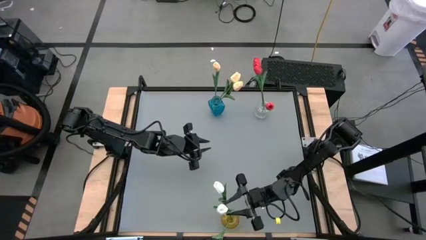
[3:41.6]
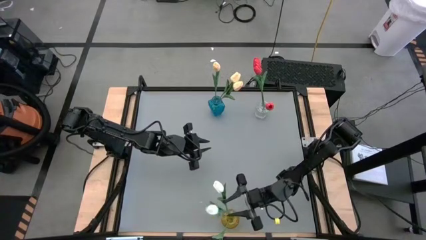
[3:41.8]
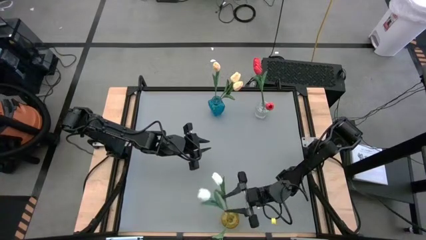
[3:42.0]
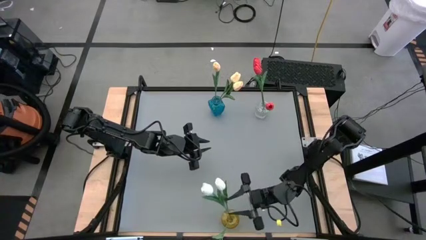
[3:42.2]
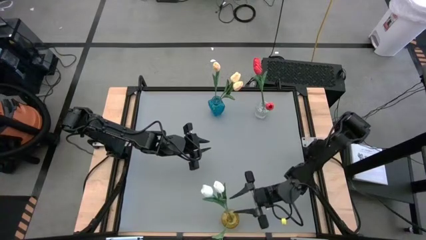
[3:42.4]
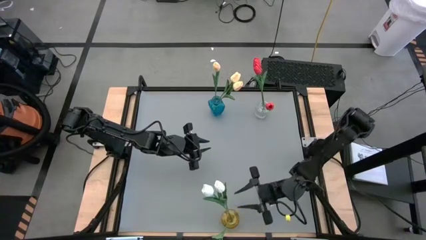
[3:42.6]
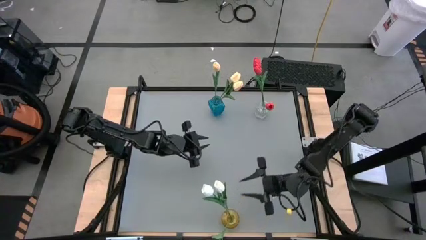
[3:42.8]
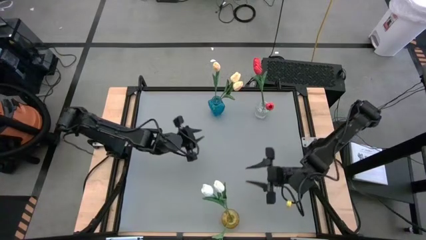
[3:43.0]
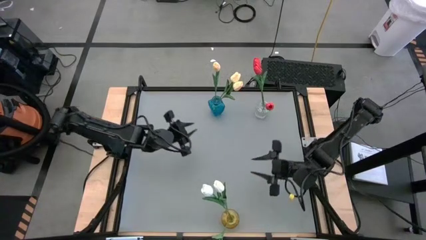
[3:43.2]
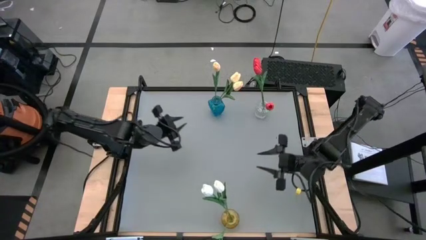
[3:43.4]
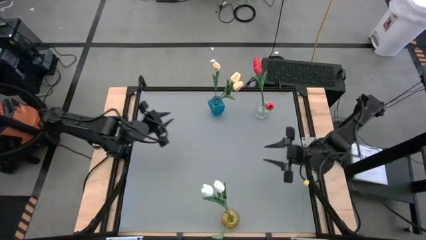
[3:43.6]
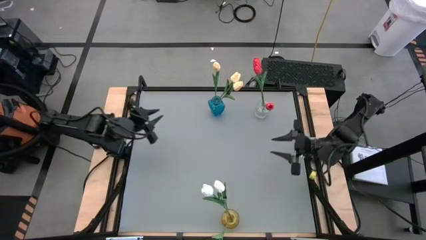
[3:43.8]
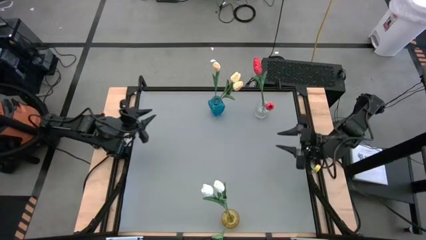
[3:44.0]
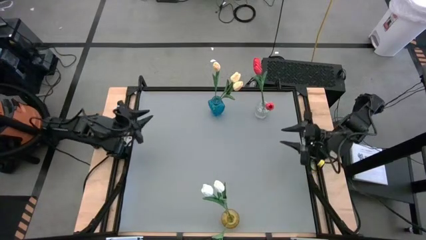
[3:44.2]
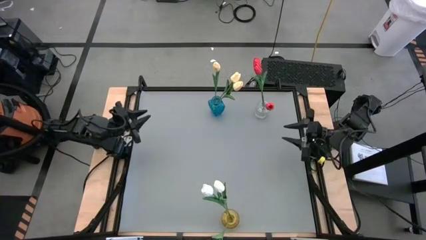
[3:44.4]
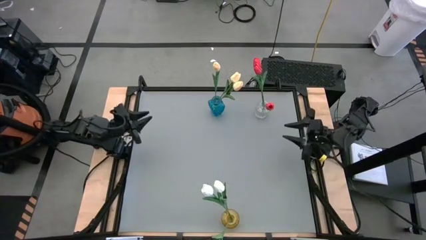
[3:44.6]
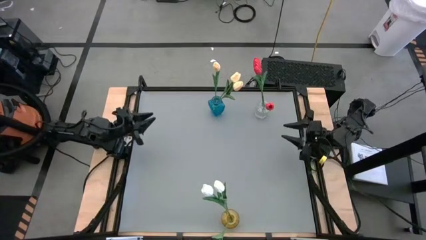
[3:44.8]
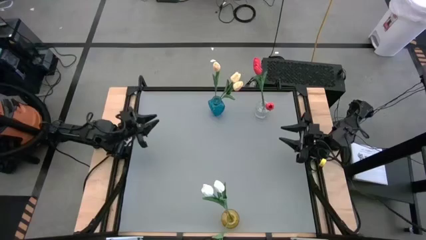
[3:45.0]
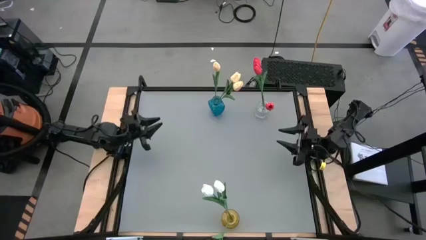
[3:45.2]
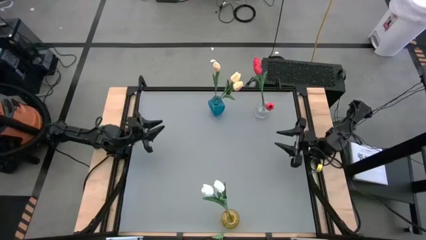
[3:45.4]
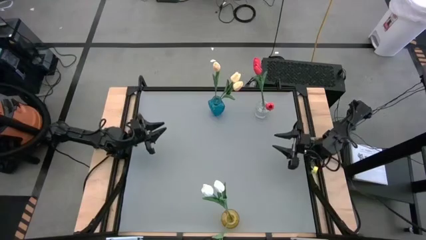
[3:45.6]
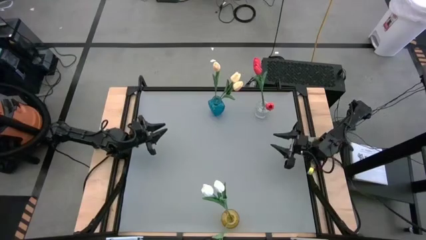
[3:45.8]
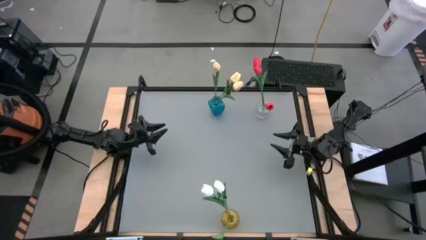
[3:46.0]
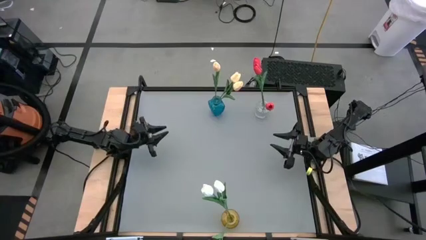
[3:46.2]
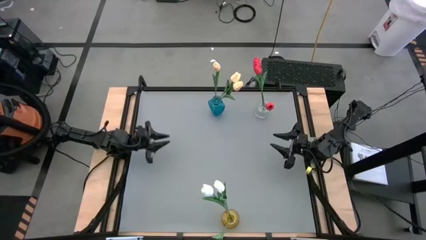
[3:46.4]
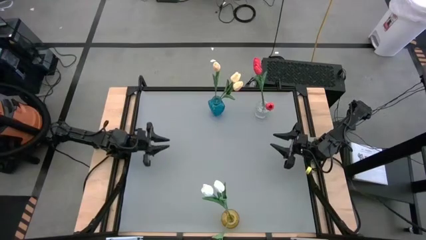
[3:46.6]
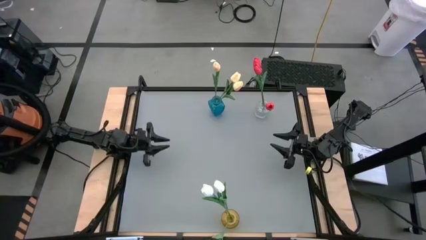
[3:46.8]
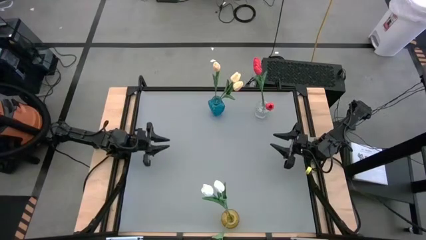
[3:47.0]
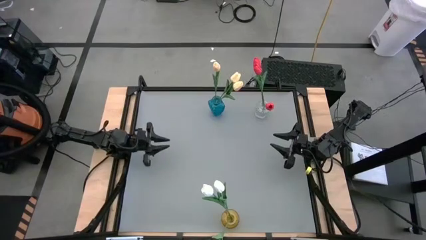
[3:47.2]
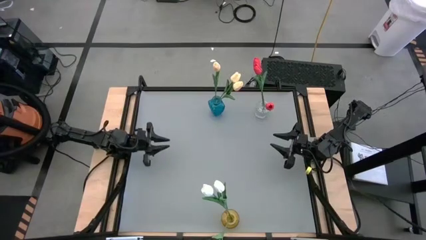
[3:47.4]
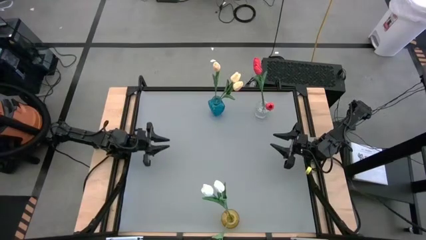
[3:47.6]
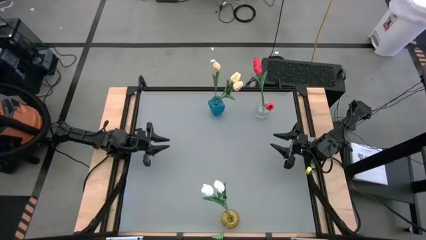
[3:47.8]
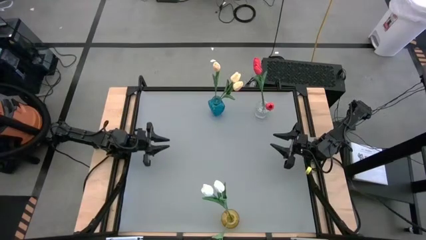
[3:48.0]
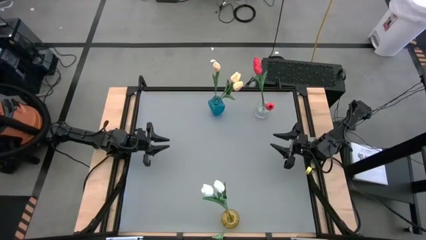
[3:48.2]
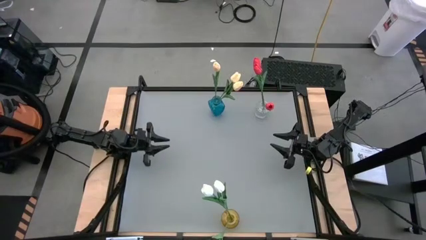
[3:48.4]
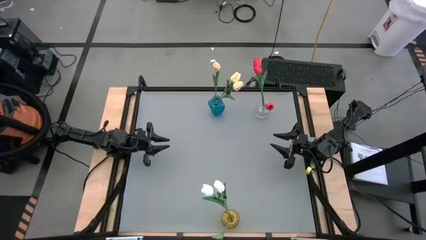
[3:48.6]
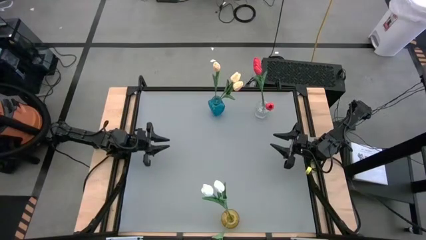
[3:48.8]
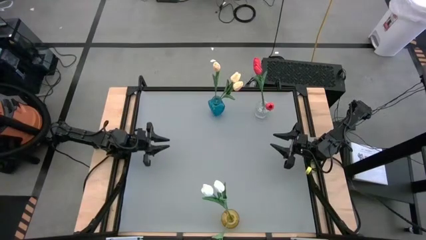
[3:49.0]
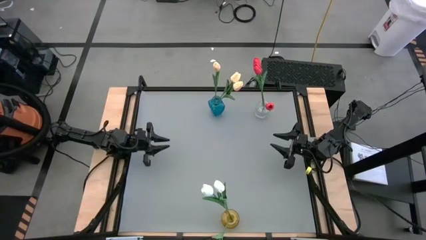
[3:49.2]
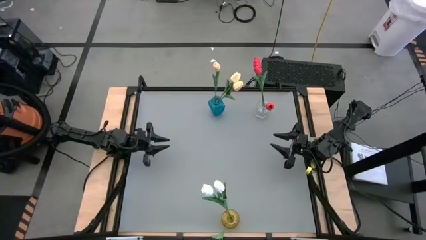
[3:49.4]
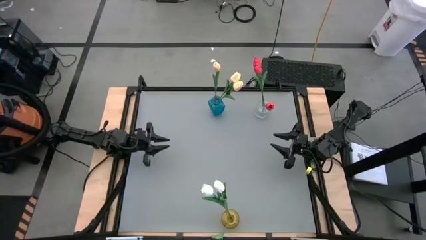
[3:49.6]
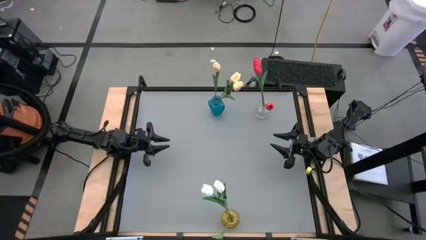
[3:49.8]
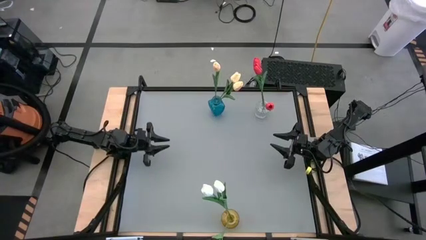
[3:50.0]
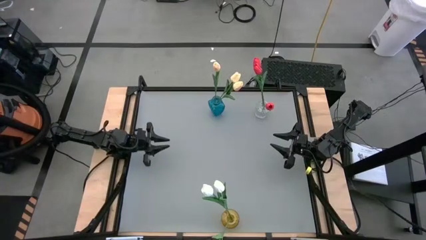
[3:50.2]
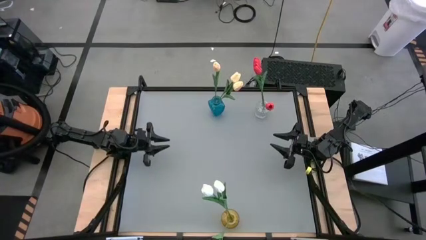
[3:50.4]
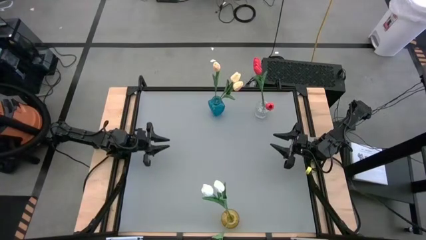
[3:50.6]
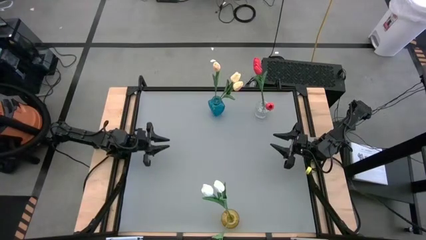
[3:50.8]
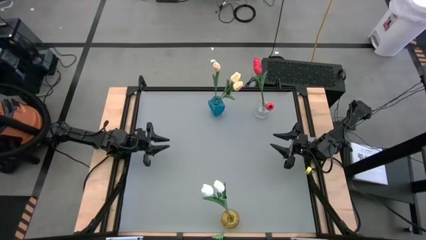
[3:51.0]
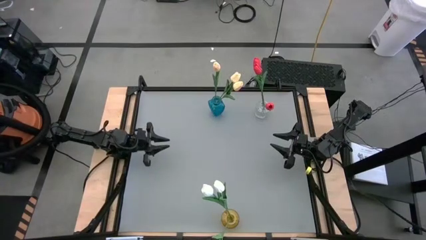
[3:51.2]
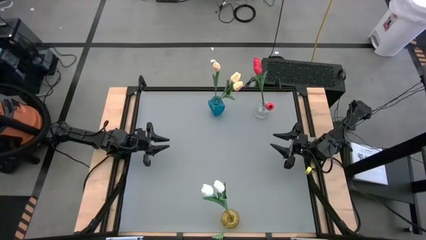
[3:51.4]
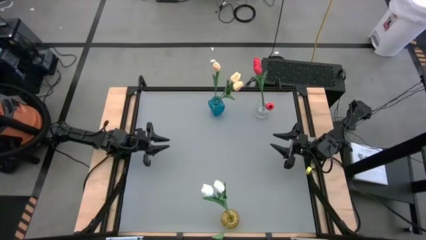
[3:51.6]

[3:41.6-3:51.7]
Task: Sort flowers into vase by color
Return to Home Position

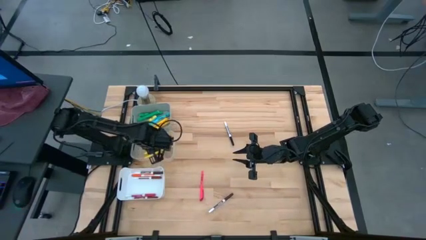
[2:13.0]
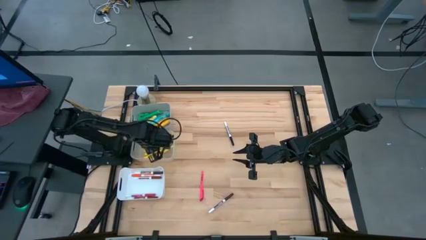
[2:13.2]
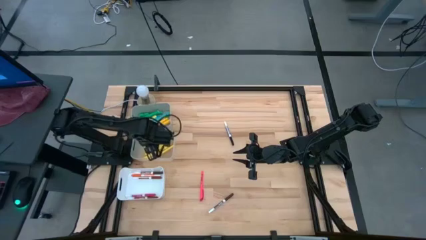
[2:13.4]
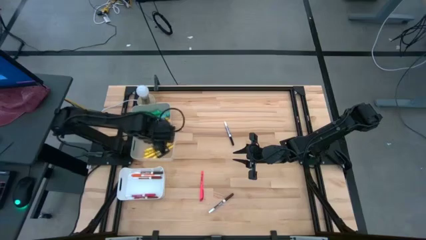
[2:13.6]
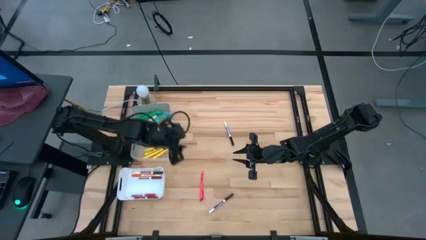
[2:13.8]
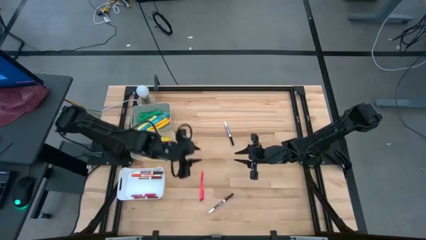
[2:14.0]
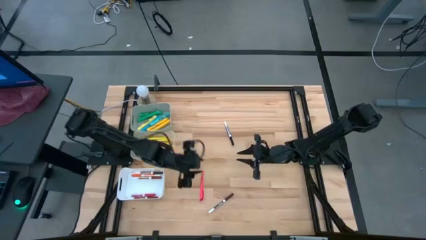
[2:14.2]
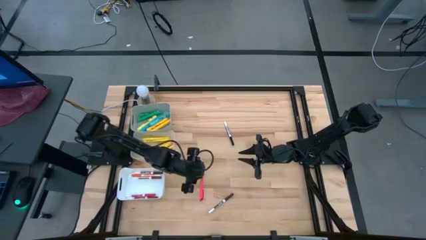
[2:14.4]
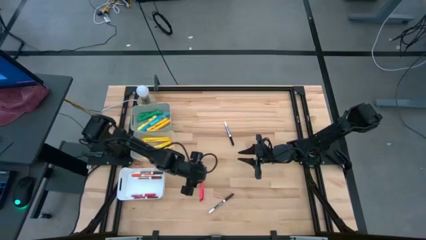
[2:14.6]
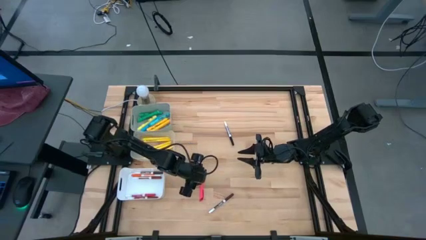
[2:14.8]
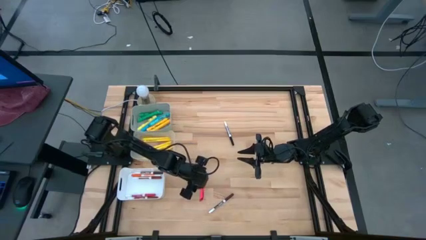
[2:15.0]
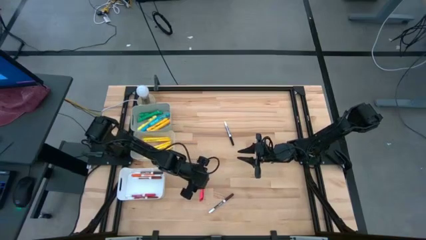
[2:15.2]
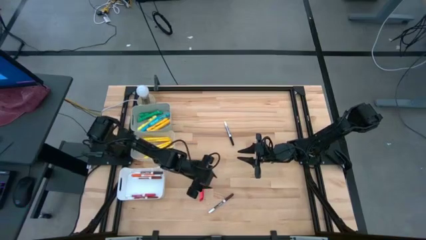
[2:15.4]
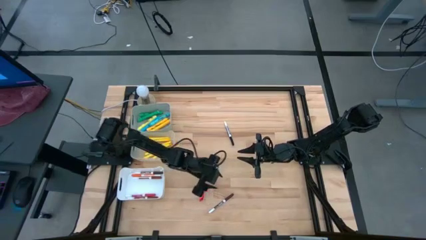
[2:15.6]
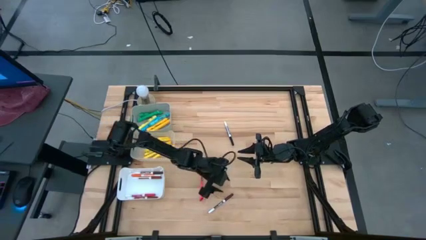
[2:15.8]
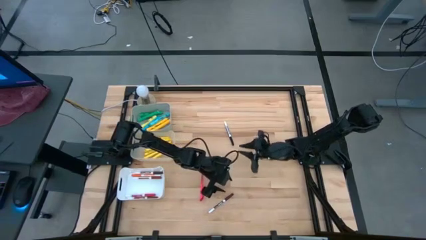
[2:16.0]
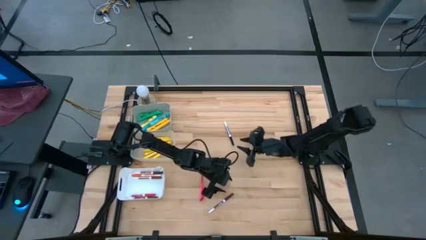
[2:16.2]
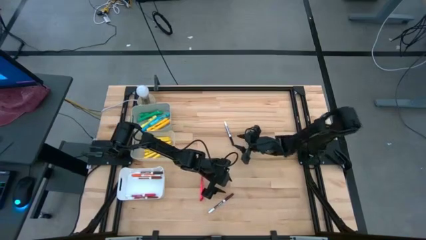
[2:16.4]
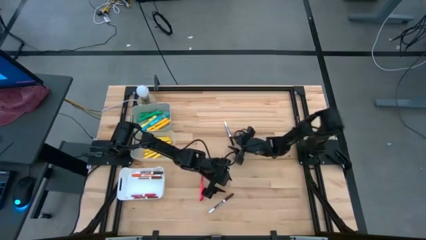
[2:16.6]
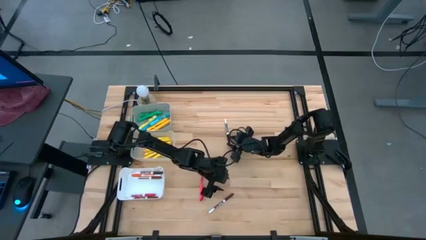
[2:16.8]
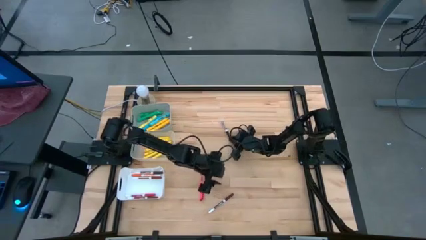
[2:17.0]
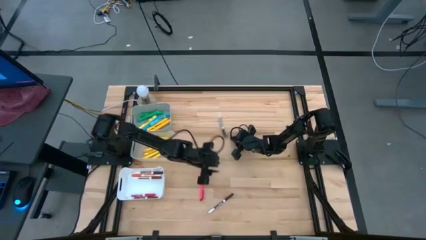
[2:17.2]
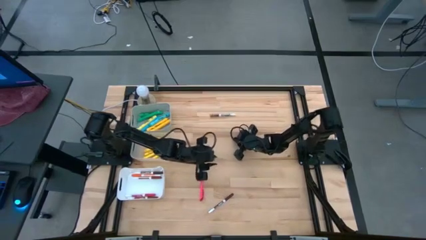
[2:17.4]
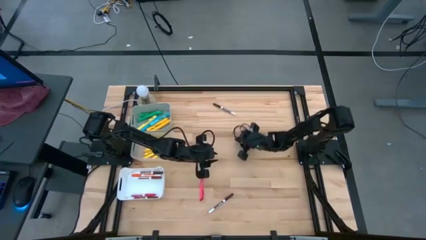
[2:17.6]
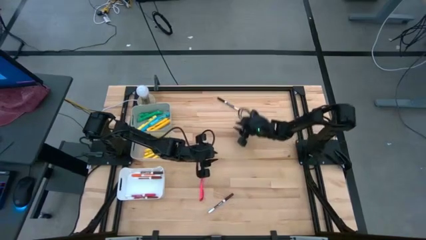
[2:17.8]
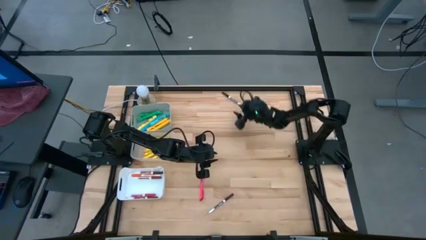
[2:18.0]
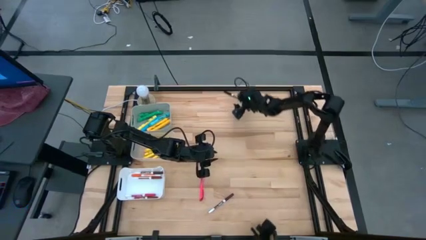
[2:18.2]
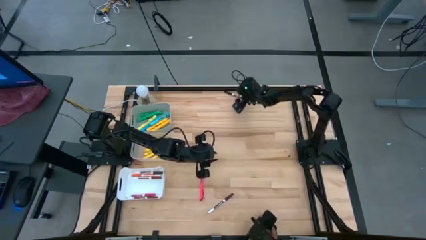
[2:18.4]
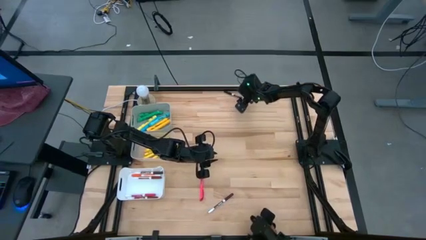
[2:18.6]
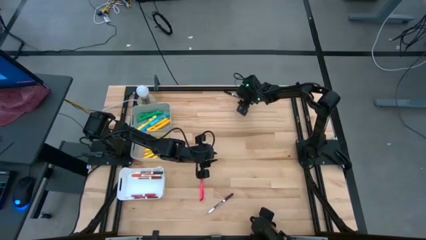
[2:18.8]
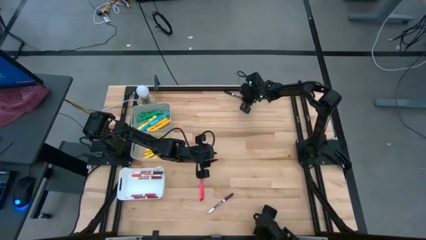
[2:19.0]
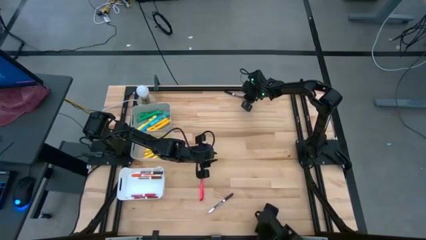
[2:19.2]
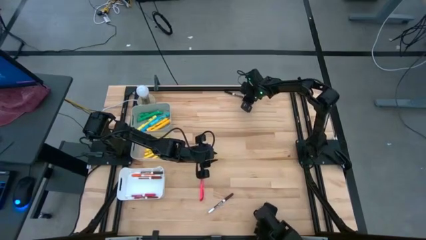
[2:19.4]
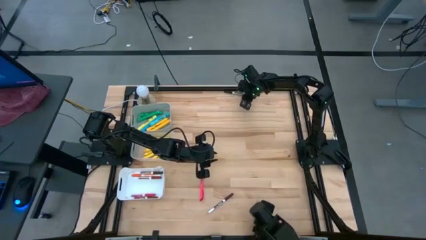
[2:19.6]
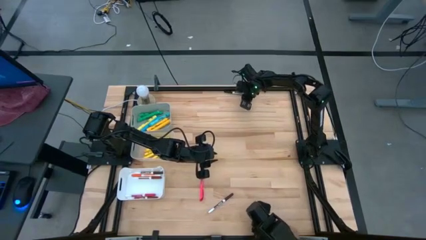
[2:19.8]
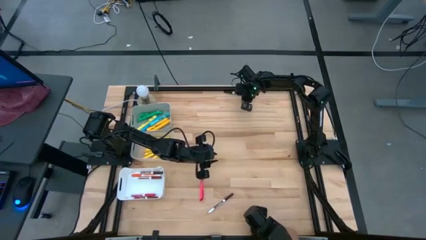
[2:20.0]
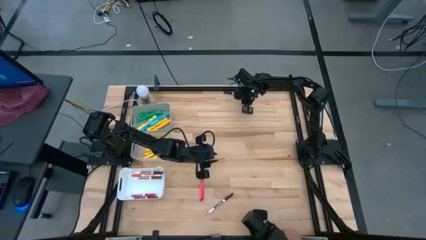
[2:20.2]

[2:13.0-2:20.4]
Task: Pick & Place Markers
Put the black marker into the white bin
